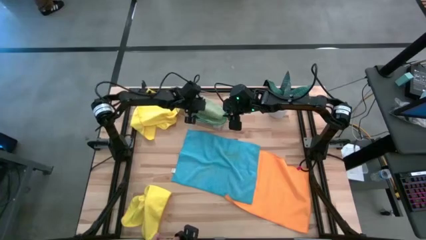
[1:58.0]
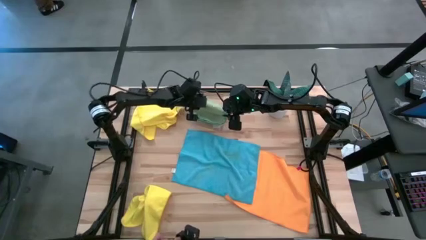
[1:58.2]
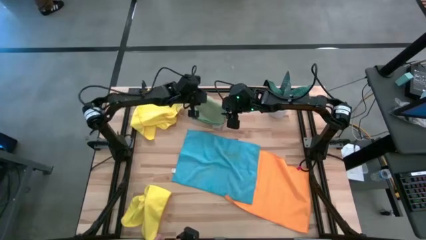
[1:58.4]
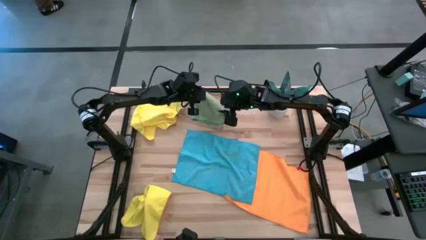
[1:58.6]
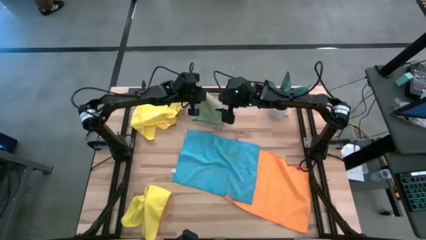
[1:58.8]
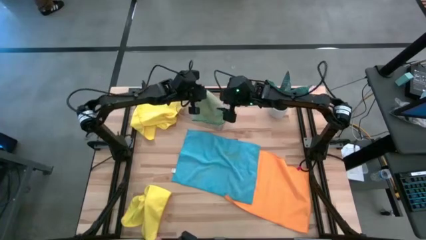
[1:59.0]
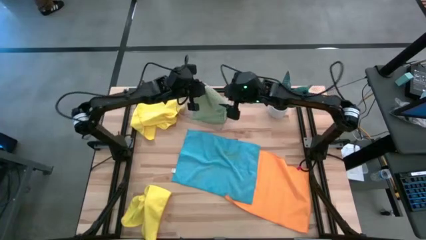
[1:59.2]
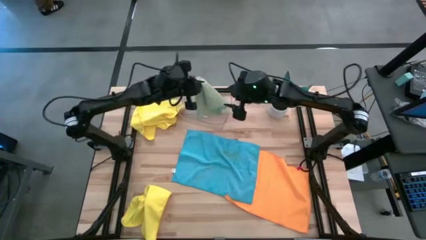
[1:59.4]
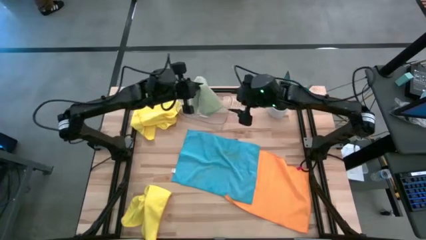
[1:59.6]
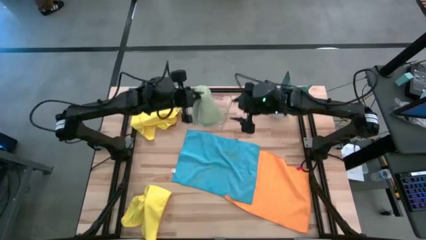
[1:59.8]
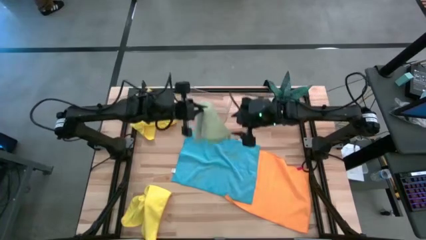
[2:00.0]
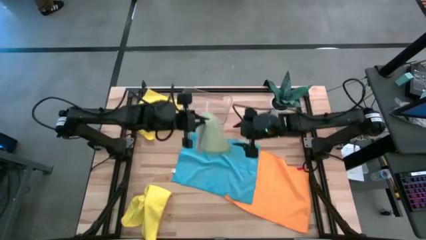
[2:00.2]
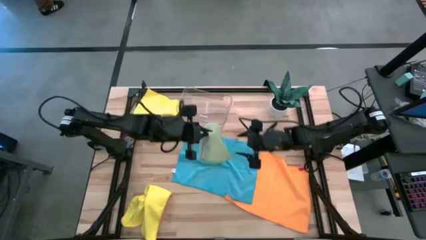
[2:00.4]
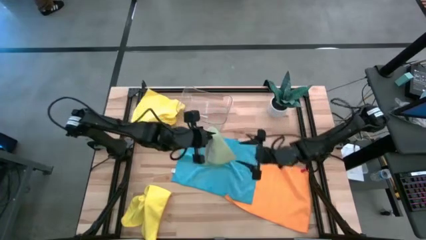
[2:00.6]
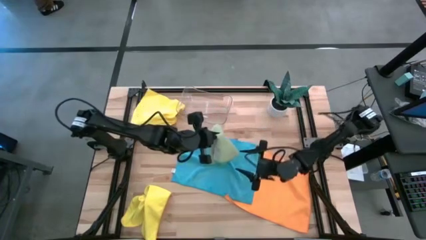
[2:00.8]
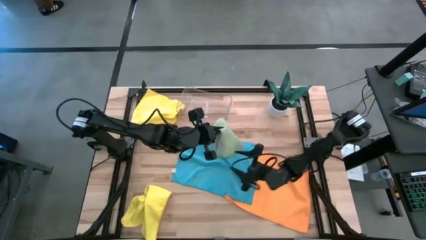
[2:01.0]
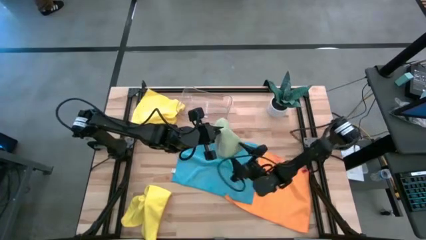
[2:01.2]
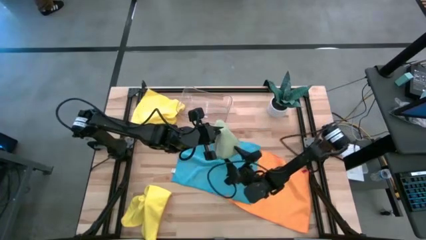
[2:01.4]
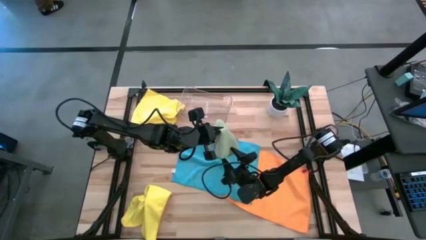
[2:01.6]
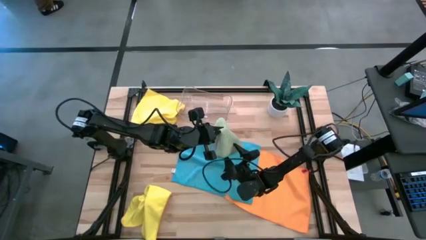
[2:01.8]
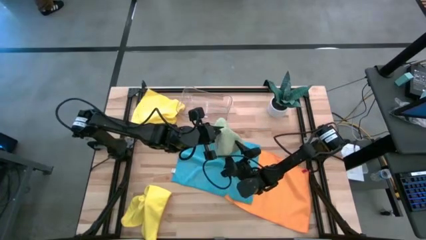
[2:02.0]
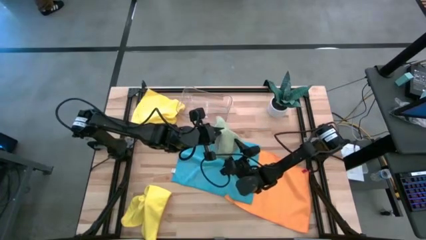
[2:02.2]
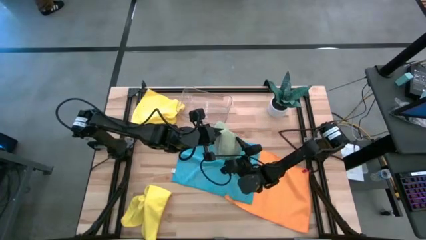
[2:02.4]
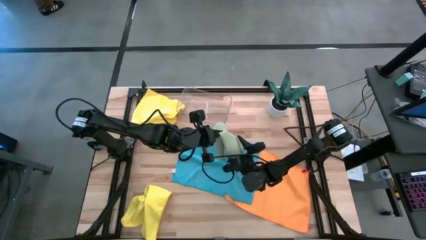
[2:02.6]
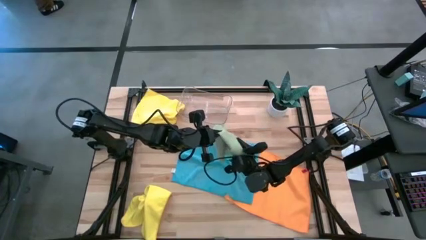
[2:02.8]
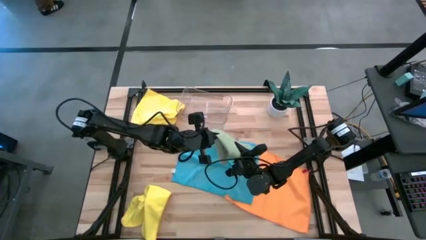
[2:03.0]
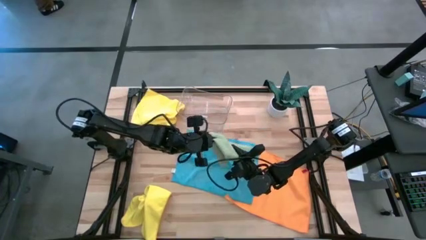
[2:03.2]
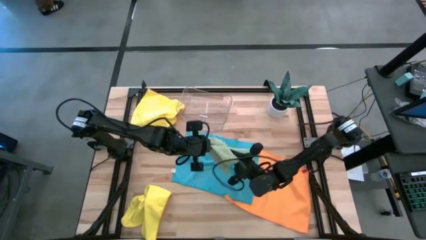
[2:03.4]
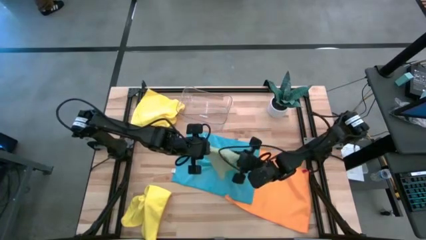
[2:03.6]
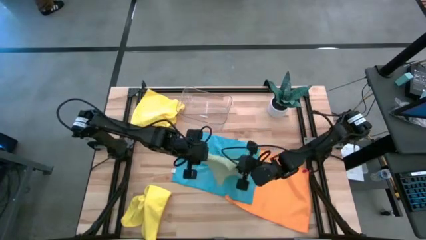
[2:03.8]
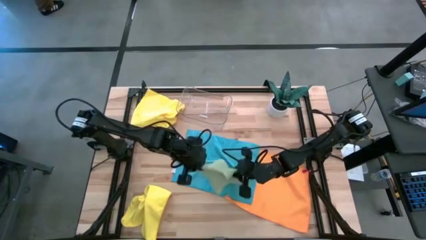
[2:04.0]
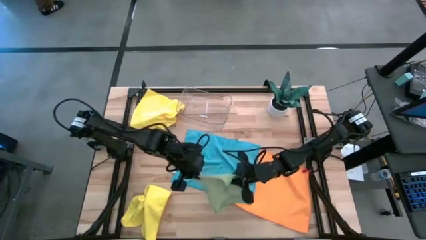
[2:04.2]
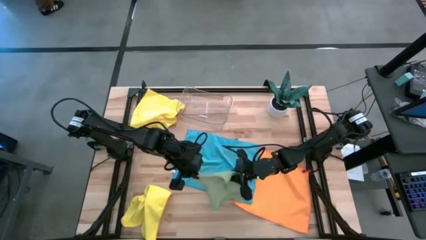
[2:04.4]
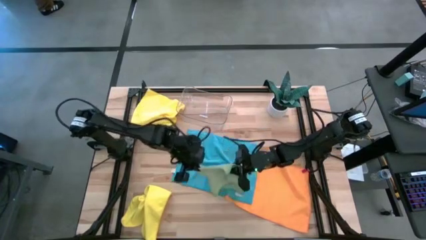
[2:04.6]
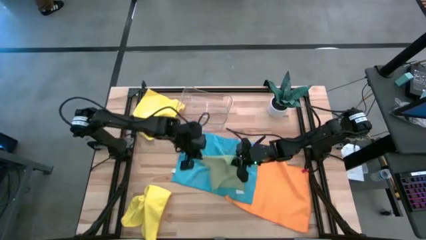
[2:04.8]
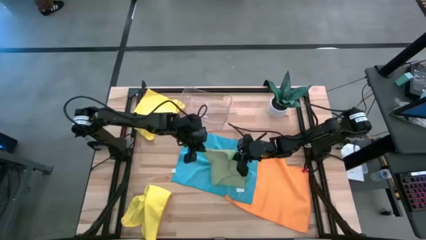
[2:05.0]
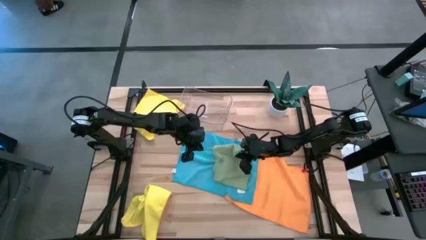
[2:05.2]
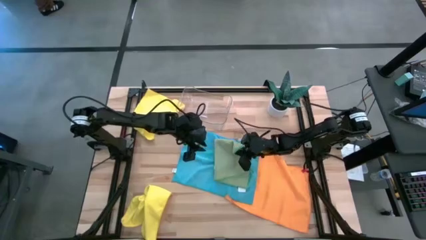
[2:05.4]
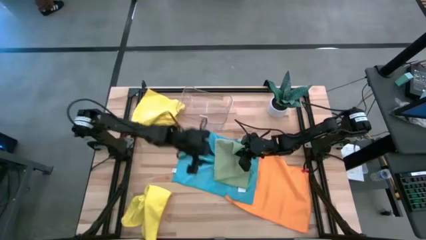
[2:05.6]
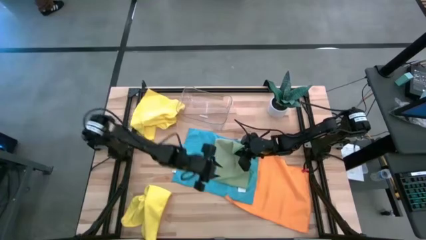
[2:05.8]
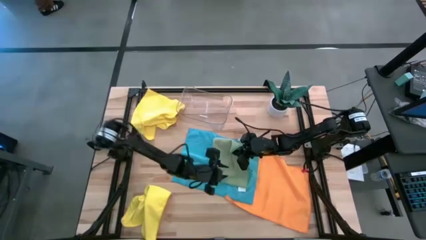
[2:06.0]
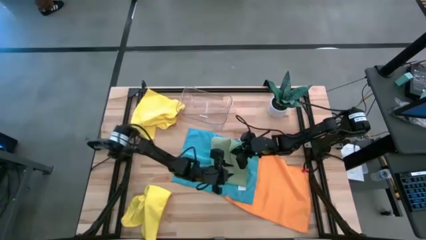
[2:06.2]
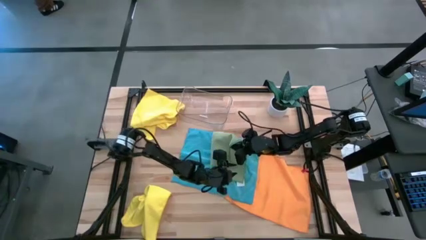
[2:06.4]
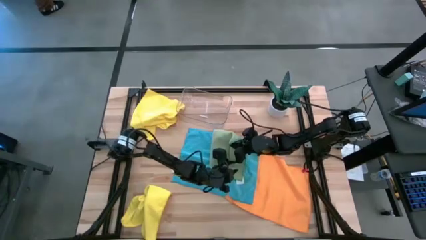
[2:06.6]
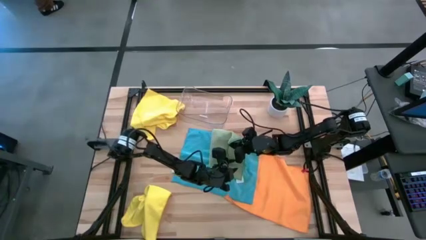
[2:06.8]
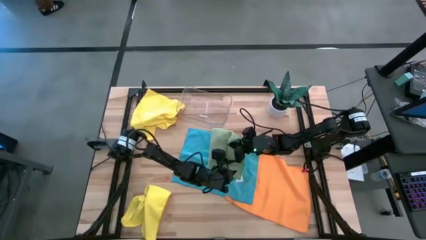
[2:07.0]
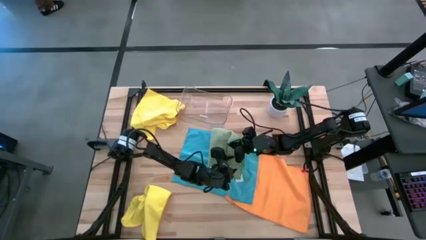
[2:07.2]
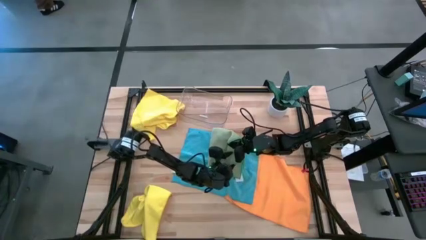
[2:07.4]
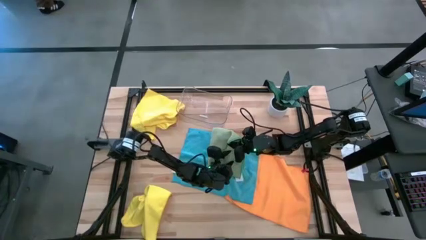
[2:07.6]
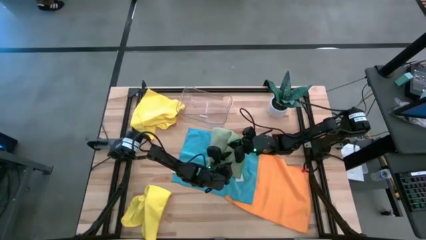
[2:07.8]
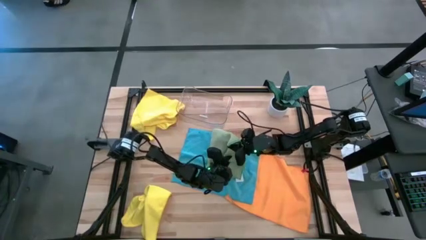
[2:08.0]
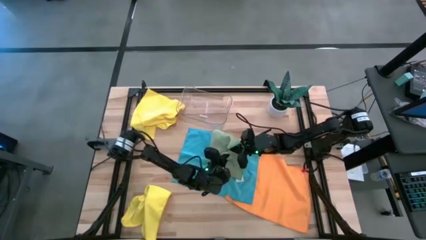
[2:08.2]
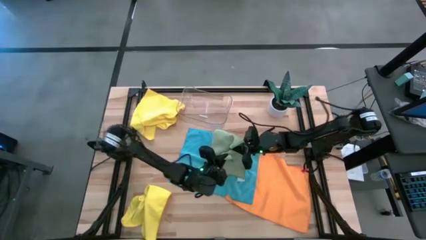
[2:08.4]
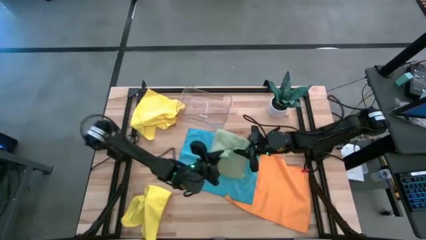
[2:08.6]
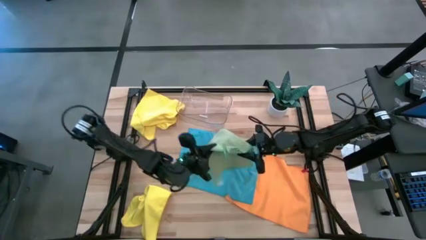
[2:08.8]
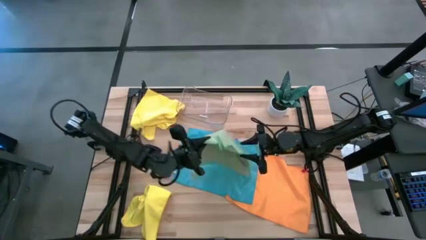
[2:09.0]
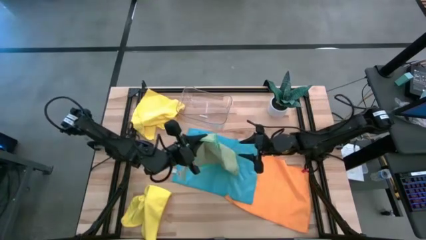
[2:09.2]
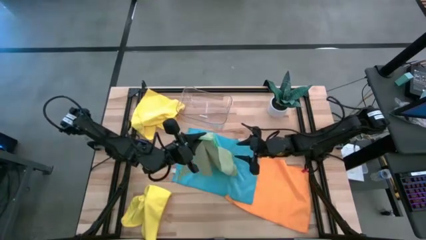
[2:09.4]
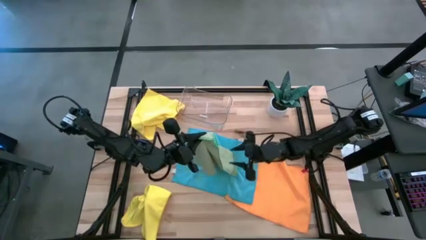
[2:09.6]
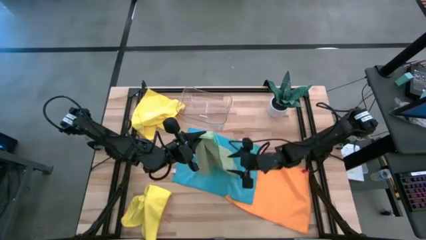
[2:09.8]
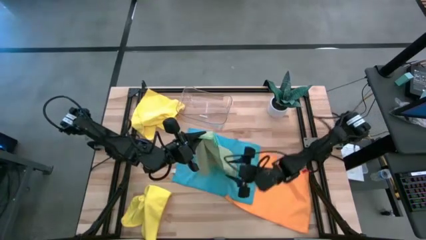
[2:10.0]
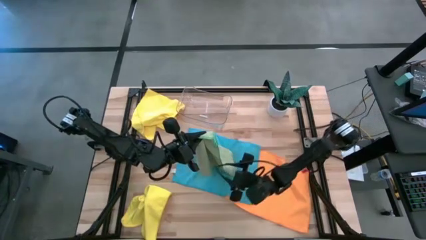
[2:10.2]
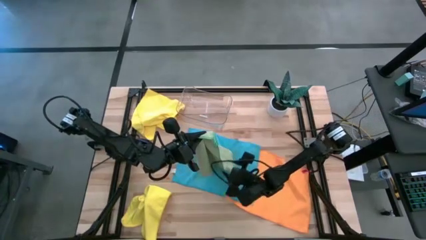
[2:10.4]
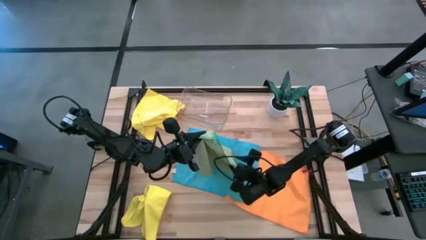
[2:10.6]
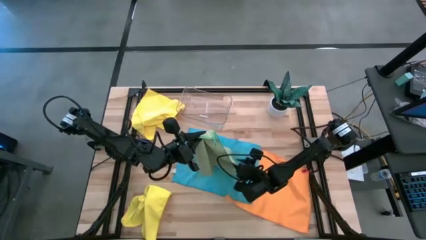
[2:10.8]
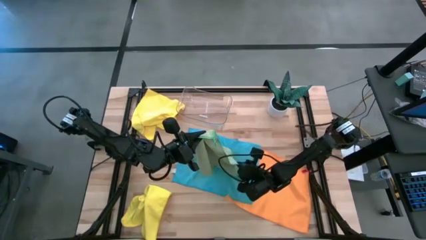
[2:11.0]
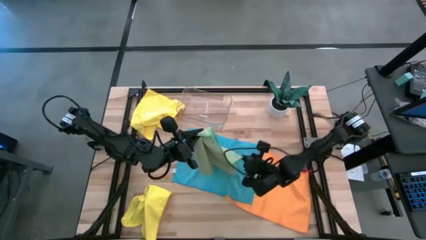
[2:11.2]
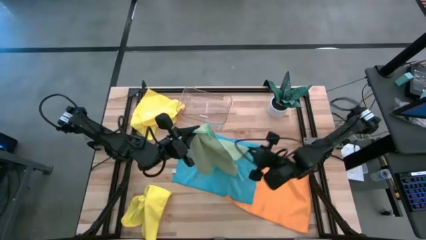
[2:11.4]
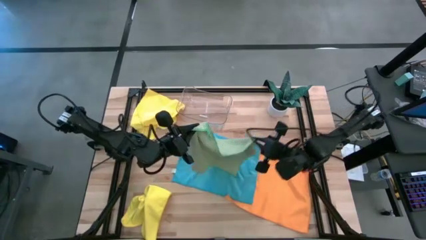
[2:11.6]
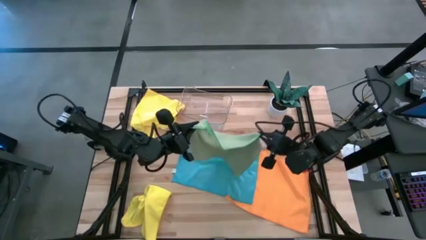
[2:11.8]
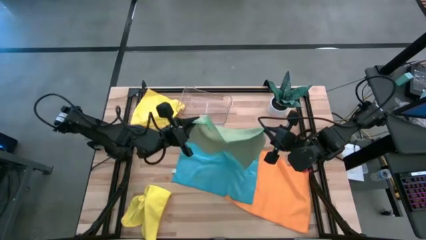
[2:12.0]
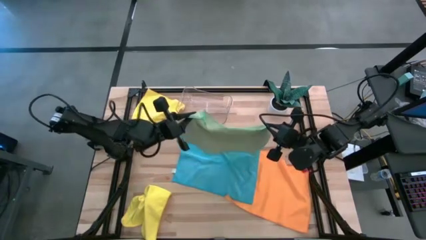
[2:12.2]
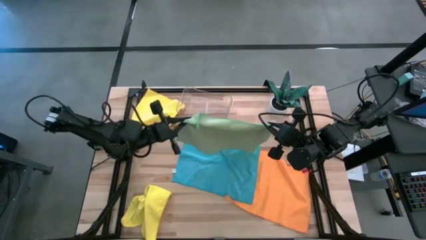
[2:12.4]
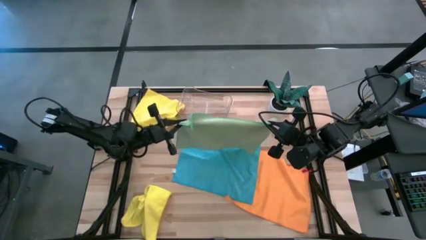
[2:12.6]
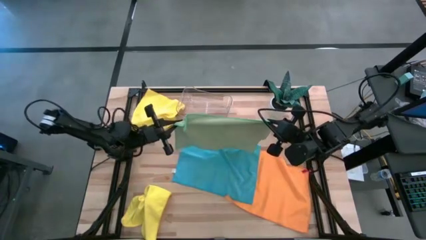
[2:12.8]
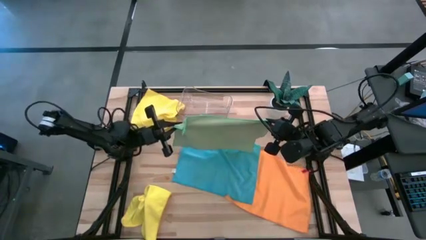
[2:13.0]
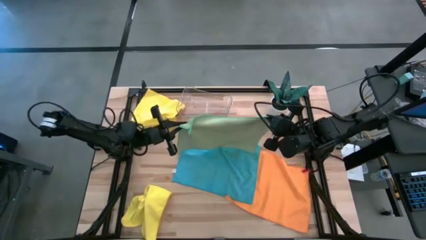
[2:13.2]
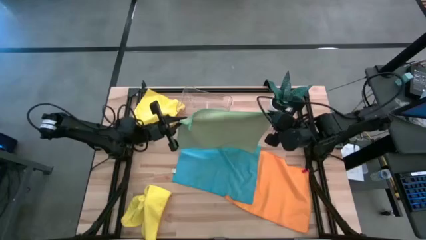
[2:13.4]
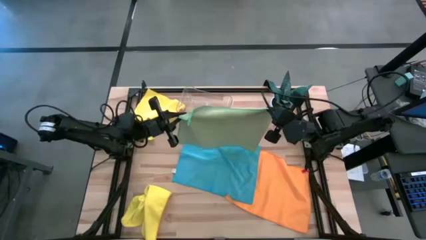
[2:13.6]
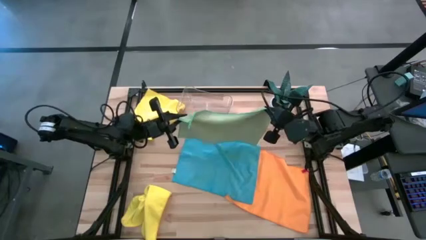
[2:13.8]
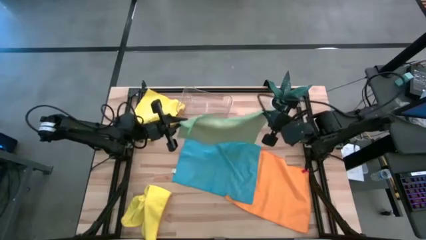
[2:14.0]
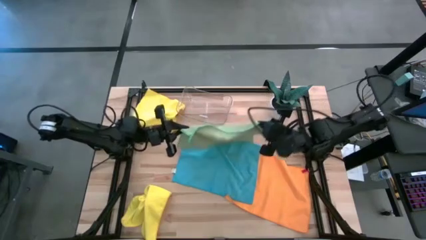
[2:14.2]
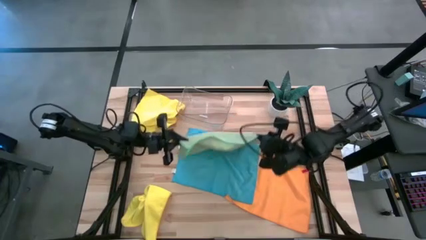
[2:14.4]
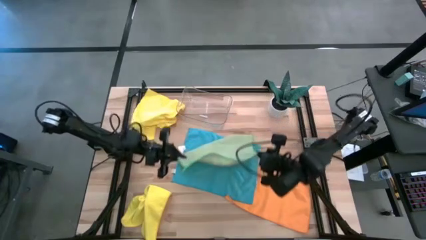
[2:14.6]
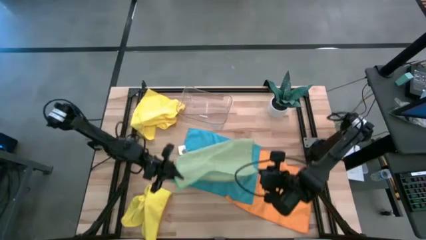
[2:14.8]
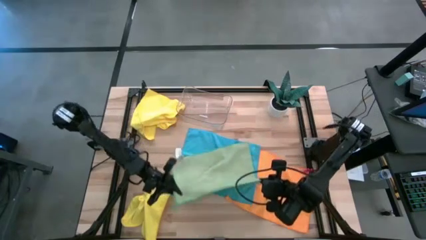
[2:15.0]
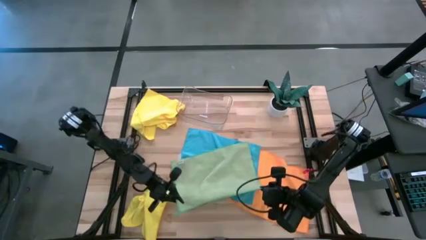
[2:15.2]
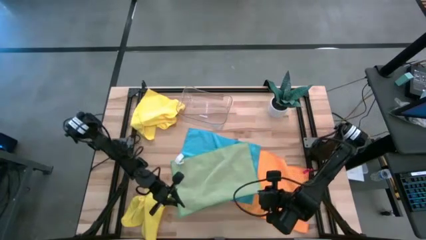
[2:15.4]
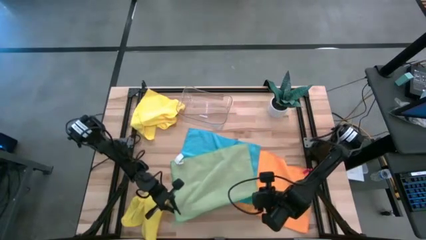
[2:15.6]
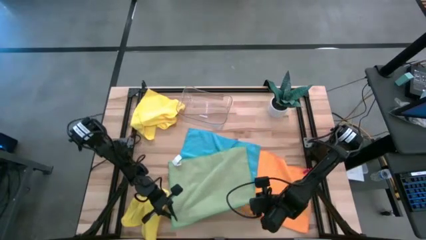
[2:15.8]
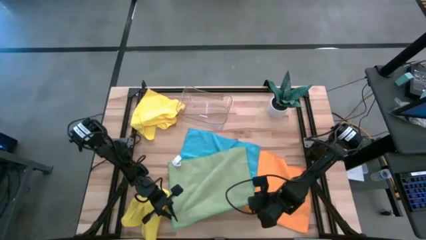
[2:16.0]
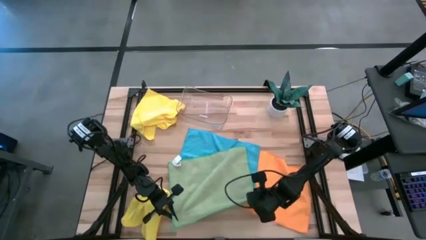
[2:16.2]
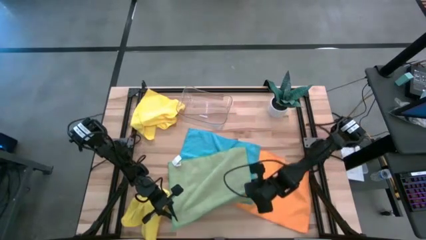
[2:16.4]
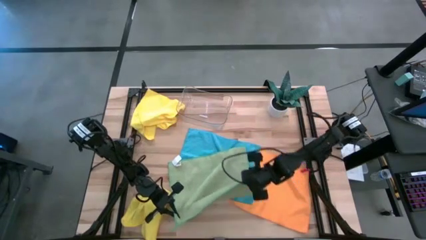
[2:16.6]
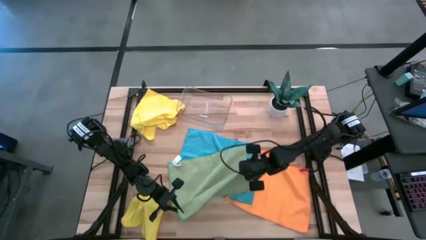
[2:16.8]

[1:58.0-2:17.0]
Task: Fold microfiber towels
Fold the green towel
